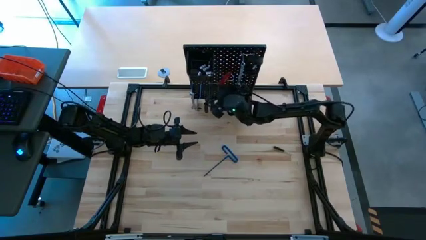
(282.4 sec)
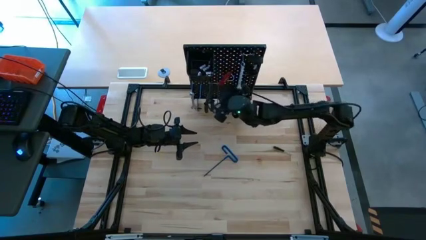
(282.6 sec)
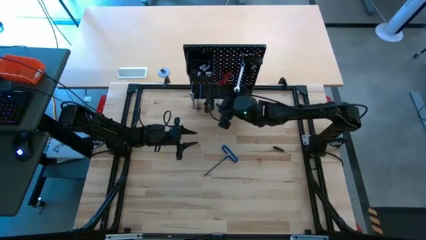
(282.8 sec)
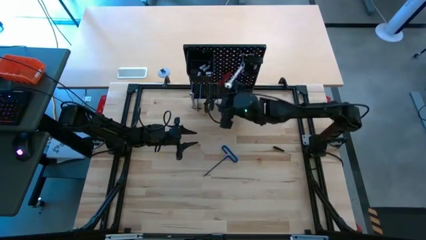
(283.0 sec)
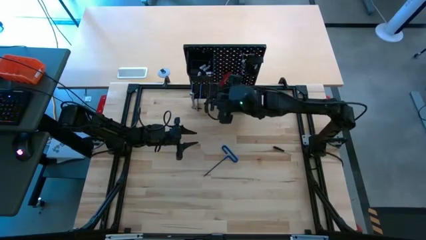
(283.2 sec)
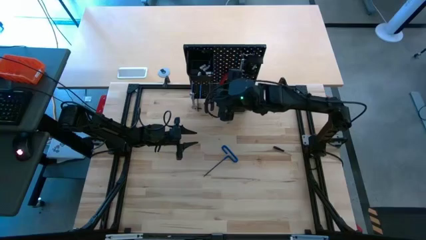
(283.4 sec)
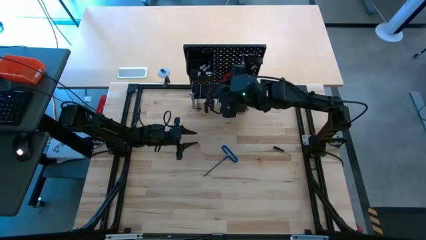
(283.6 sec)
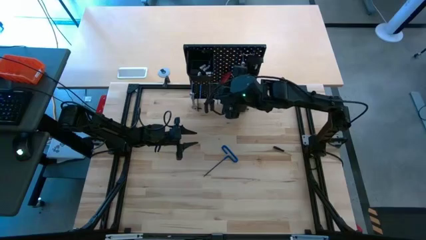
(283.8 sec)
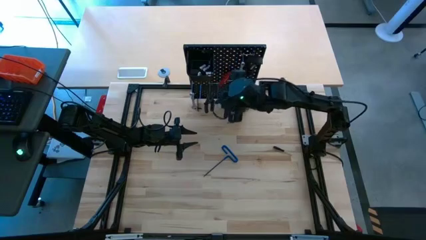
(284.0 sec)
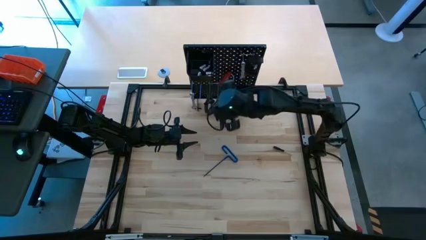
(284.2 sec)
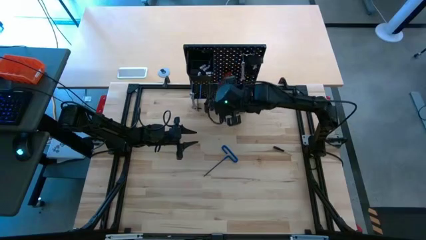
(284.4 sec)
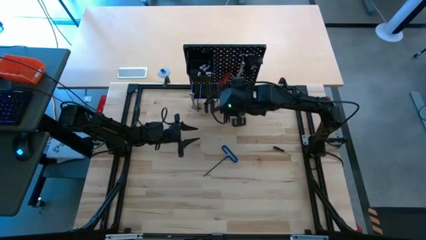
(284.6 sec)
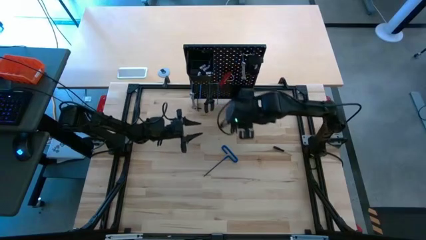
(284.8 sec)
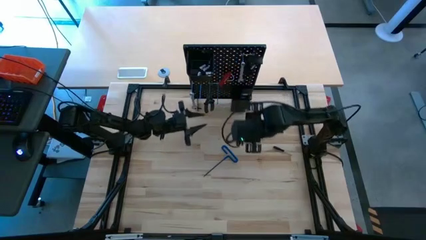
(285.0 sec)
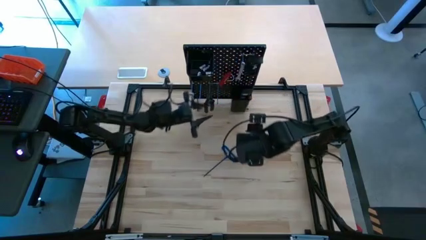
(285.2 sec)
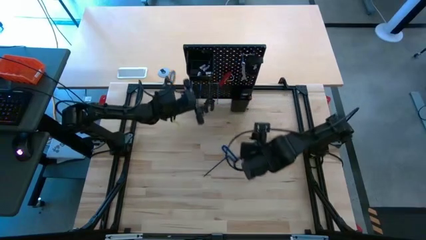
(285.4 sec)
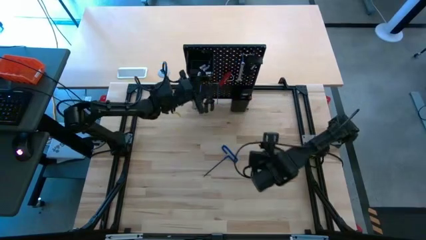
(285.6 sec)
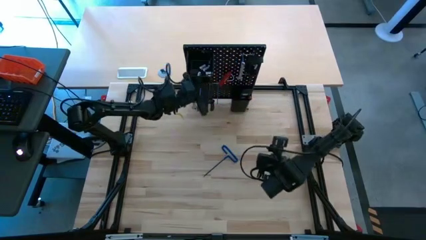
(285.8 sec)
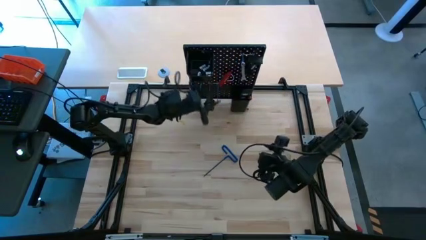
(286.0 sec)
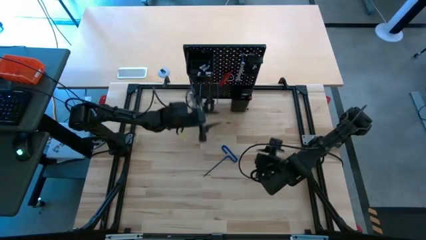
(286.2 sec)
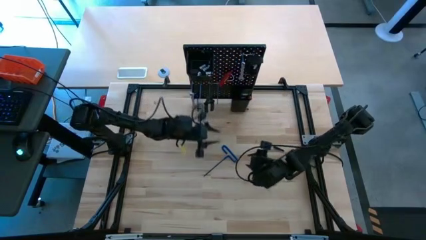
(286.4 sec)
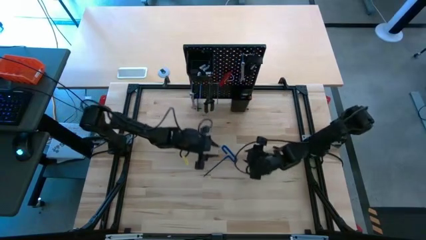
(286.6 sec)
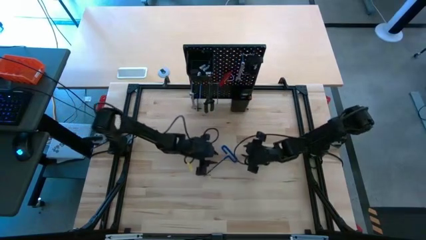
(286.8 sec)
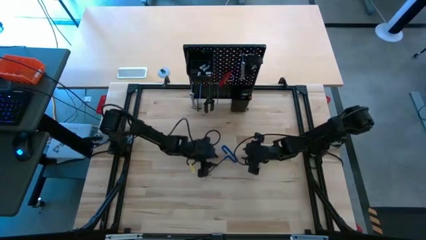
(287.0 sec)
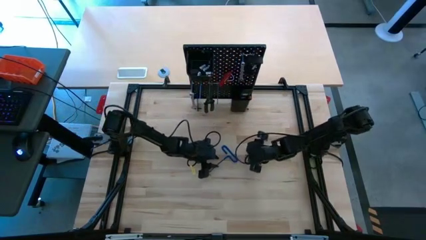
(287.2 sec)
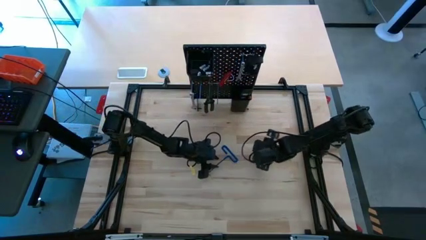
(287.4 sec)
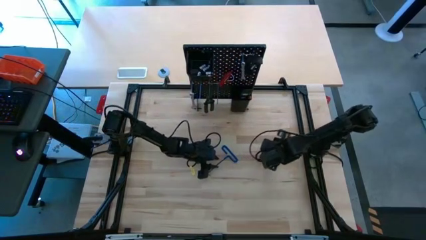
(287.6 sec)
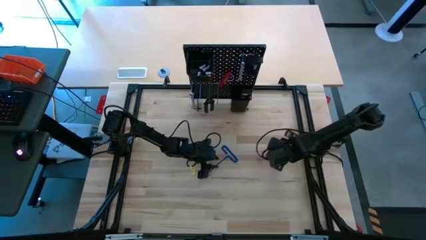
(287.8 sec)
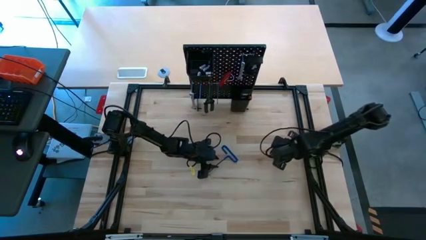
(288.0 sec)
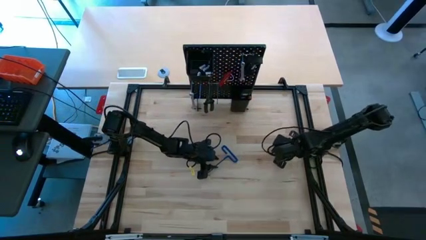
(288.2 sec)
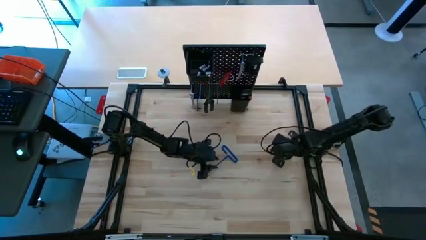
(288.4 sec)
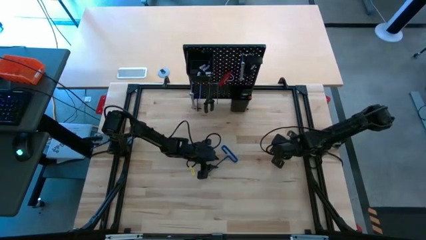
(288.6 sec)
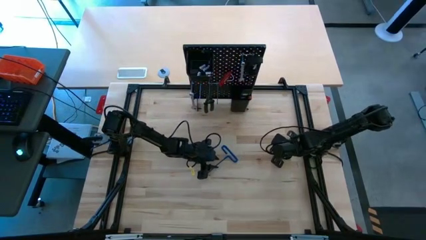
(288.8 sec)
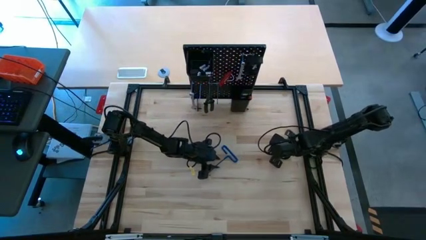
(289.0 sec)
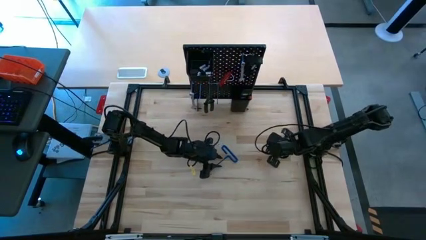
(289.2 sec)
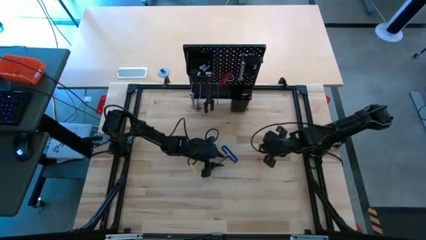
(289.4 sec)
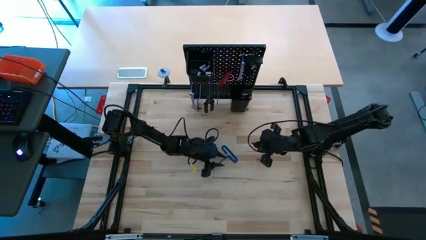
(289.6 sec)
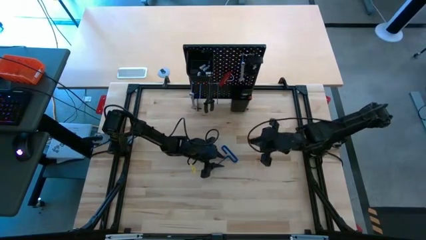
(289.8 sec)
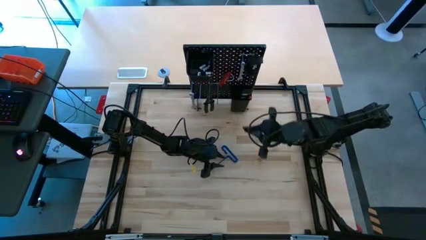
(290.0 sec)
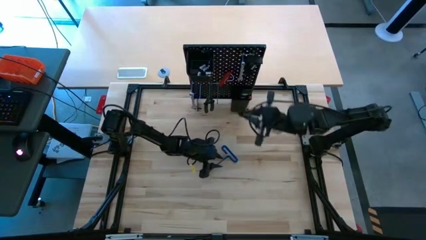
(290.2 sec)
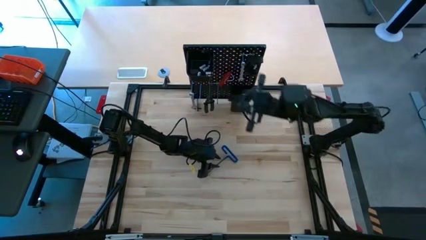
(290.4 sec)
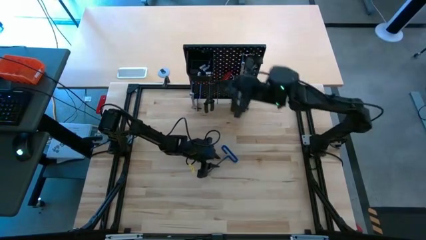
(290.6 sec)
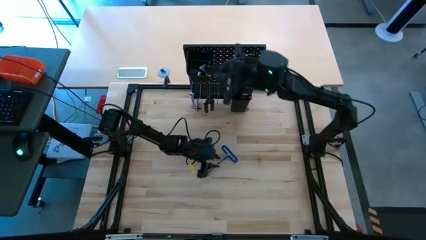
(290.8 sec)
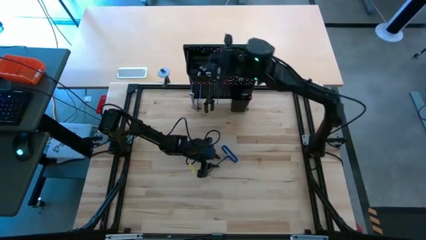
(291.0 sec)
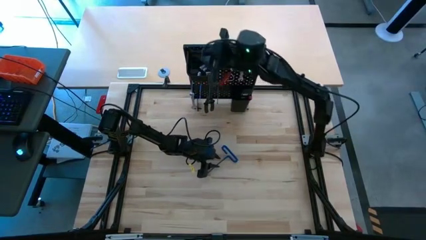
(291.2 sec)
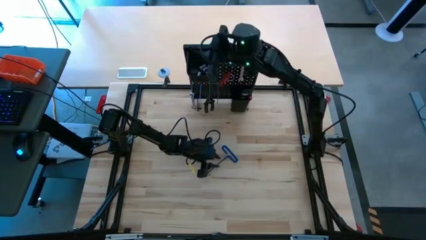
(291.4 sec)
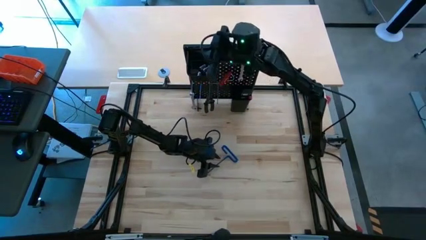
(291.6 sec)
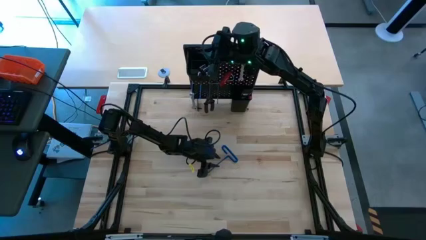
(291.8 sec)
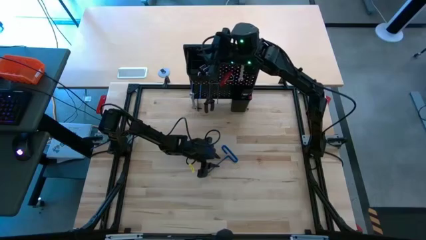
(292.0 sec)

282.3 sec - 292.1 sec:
Task: Hang tools onto peg board
Put the nut driver into the top bin on the pegboard
